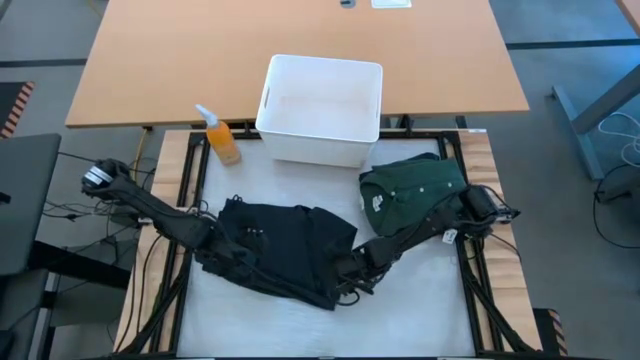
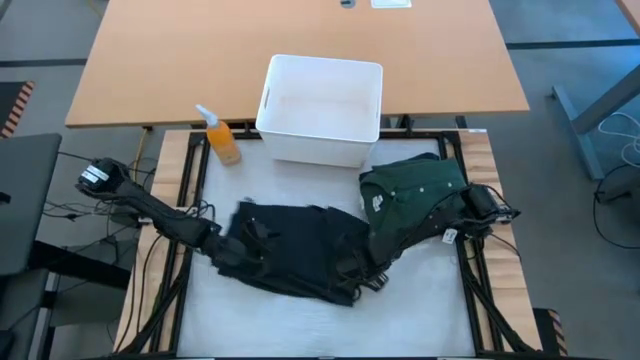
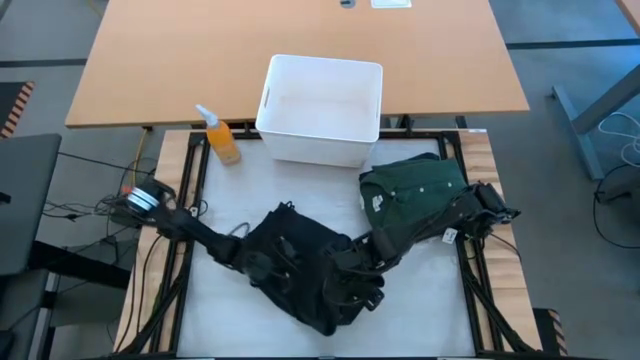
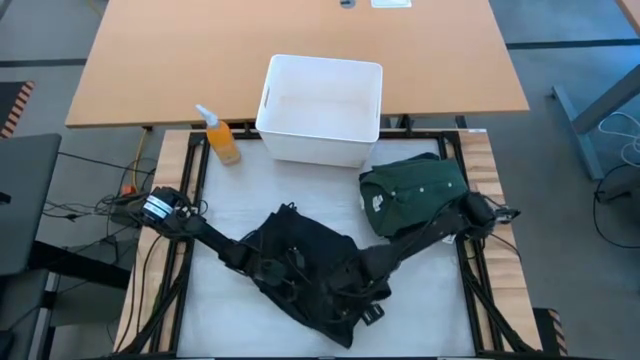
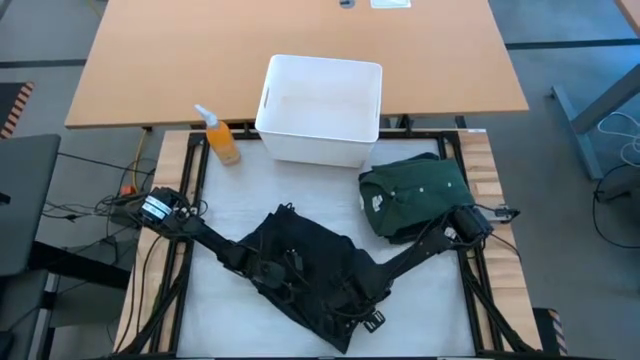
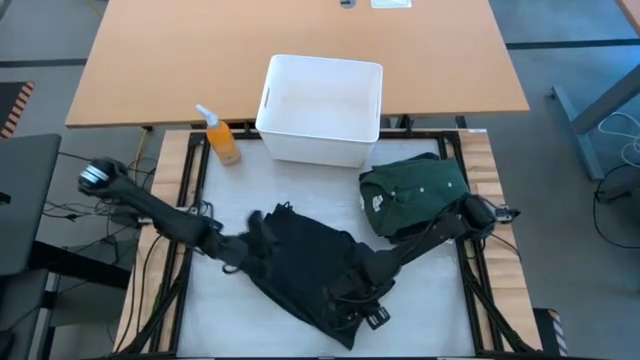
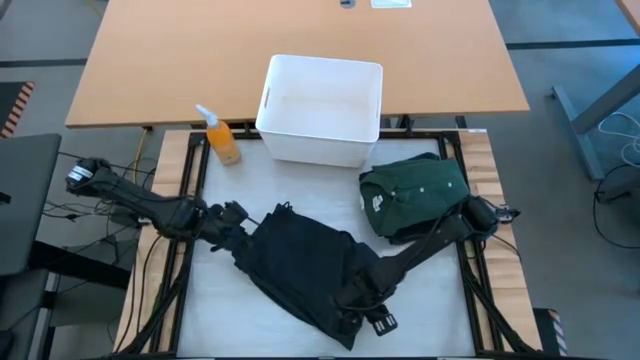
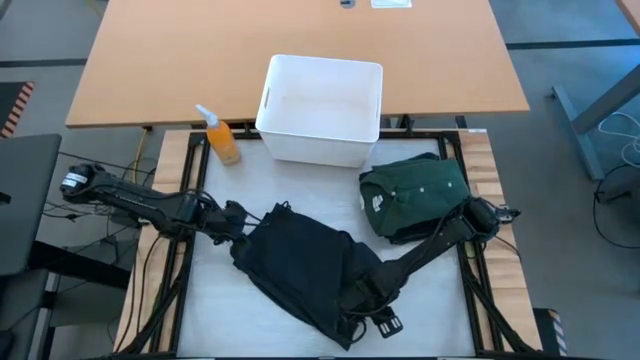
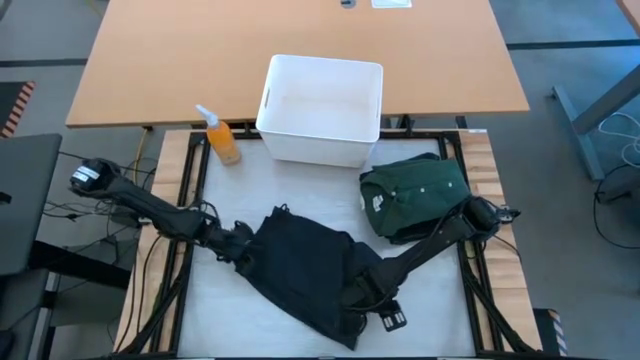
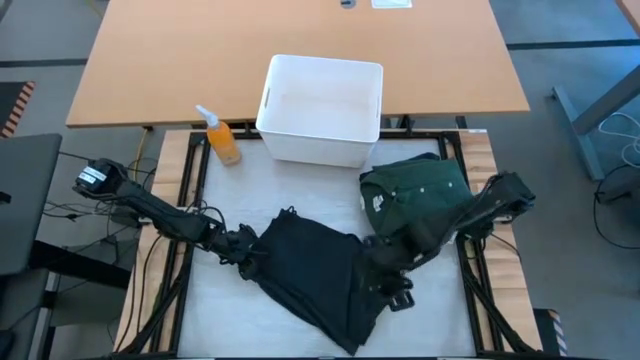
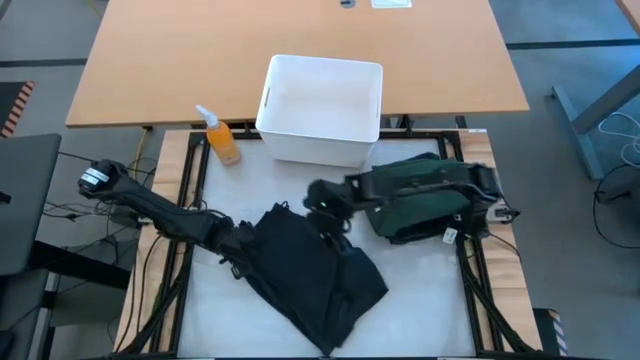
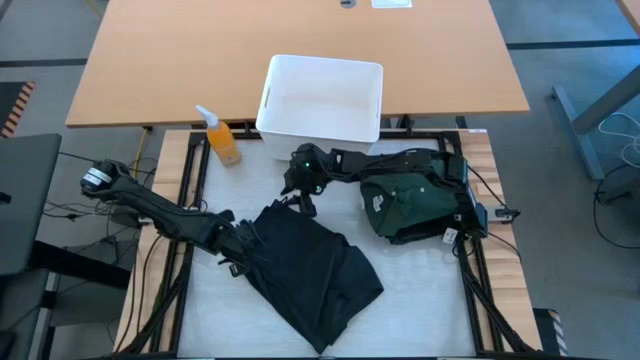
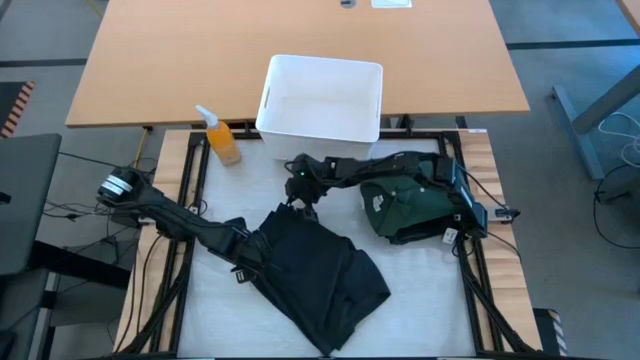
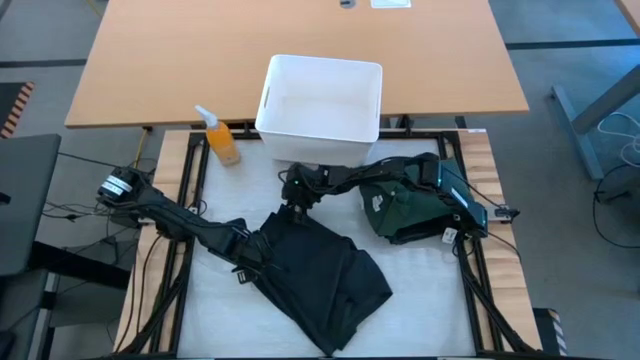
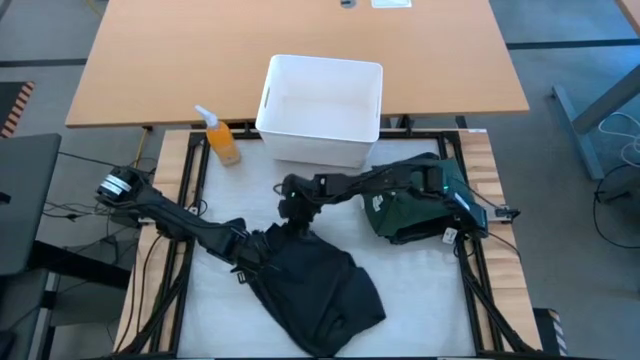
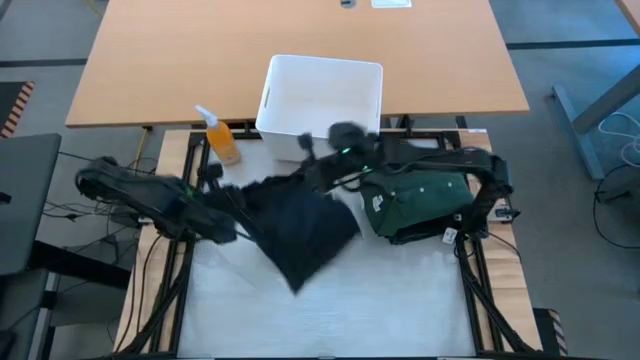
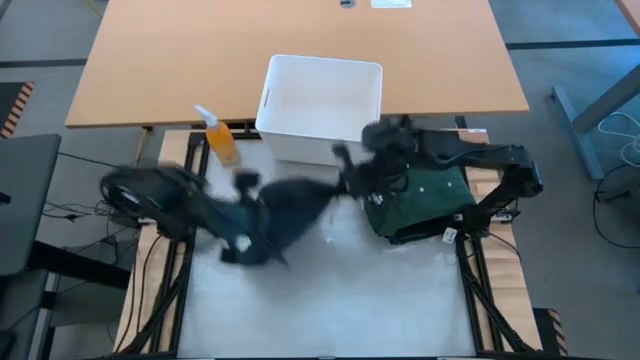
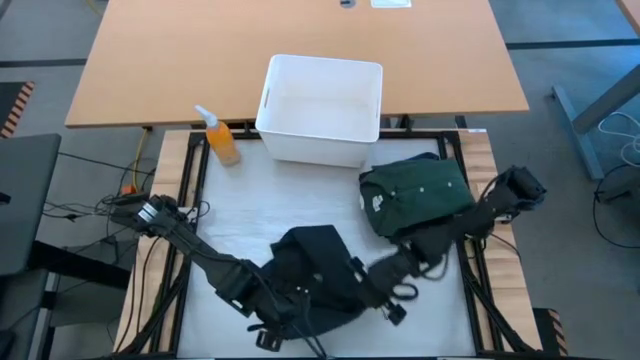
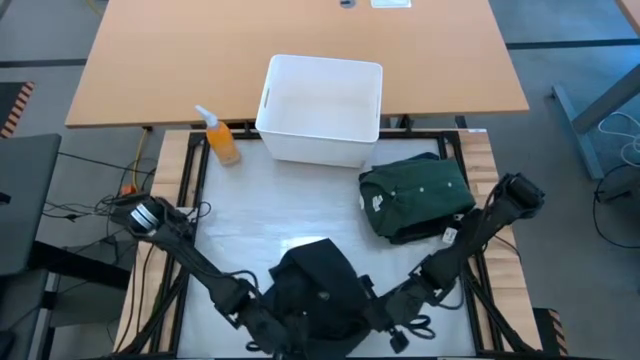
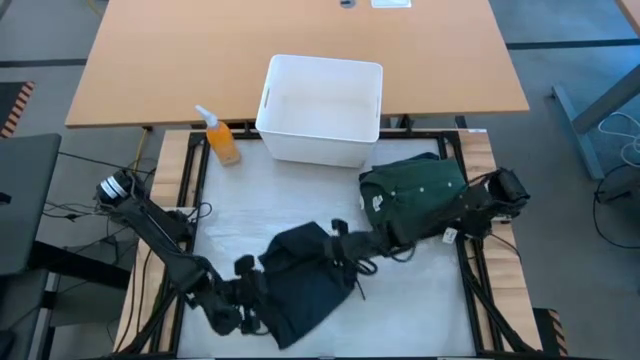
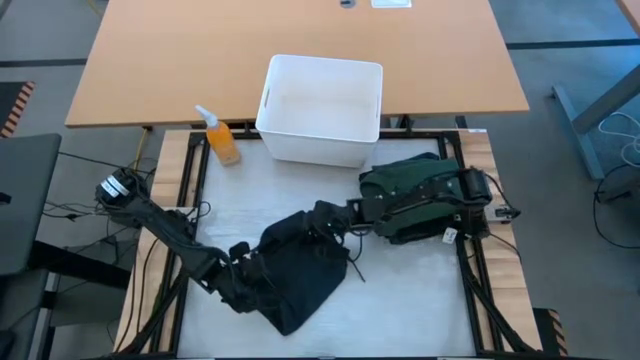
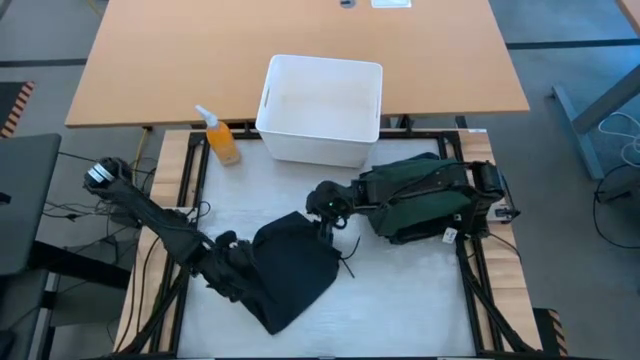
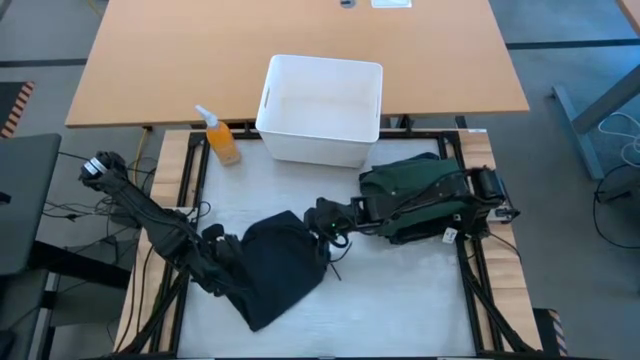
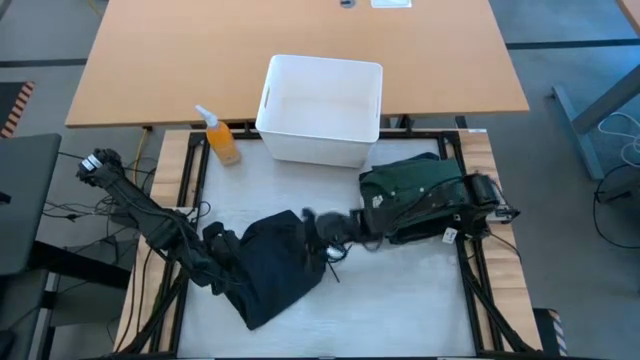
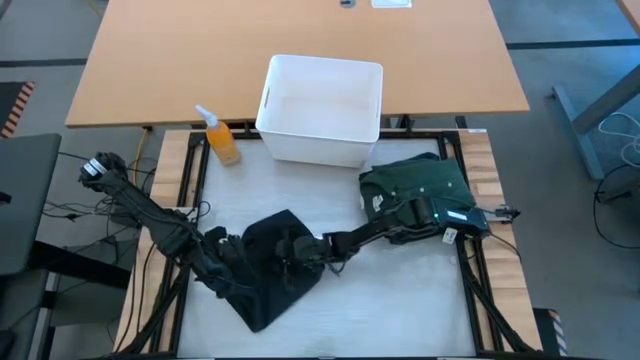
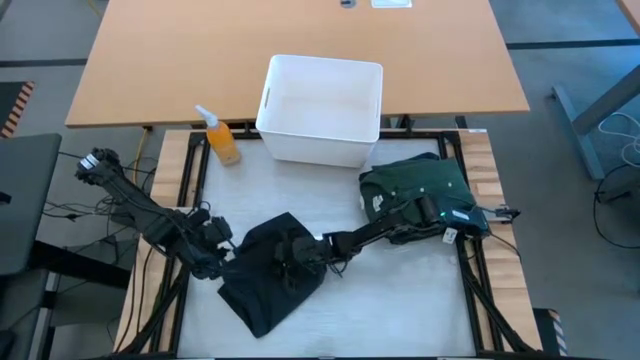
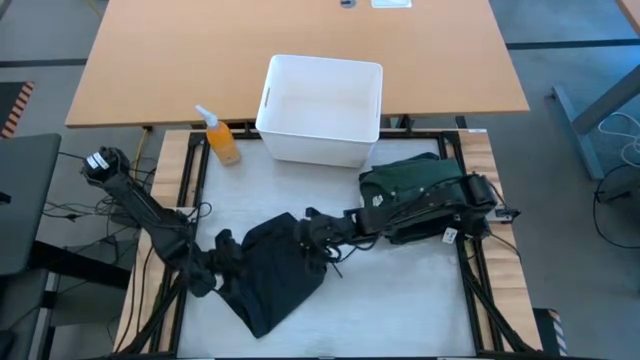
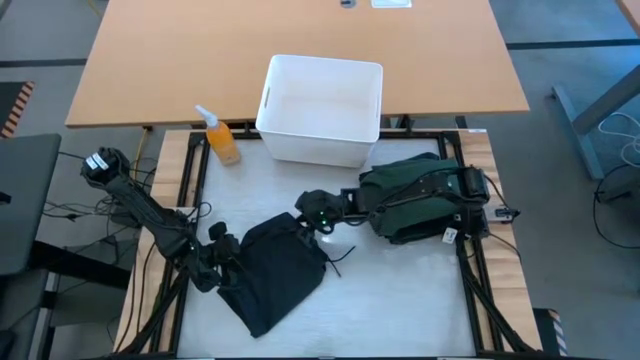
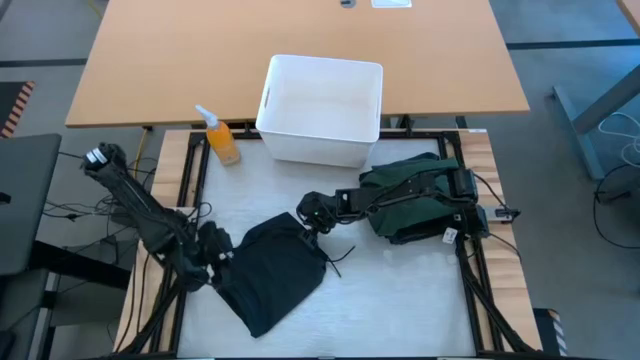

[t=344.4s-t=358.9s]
Task: Fold laundry
Fold the black shorts

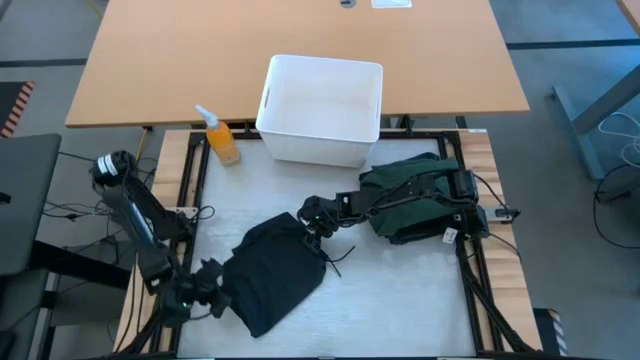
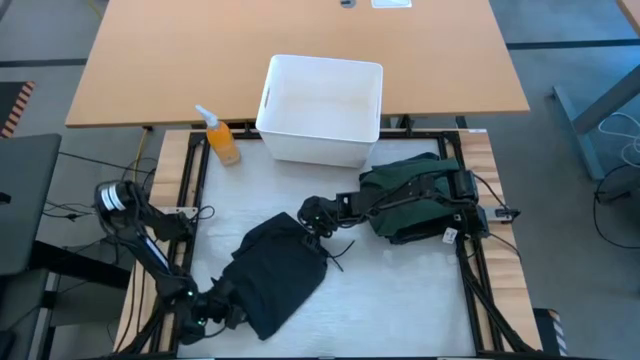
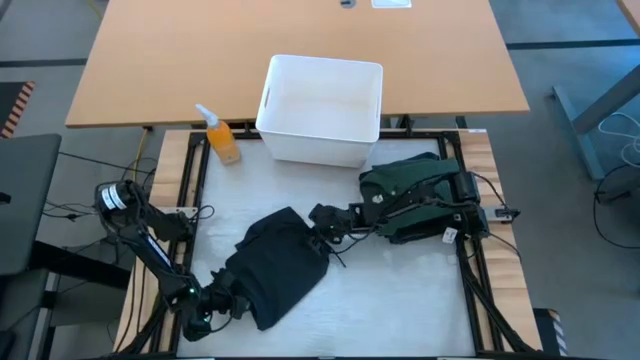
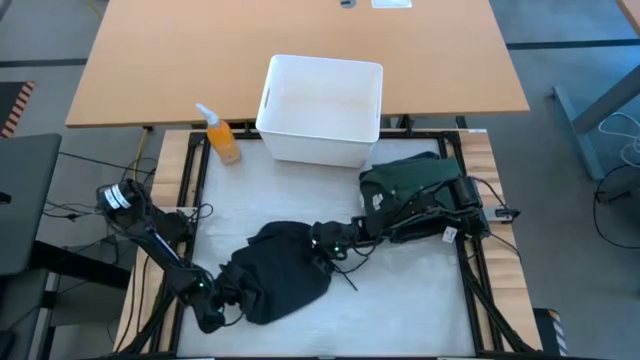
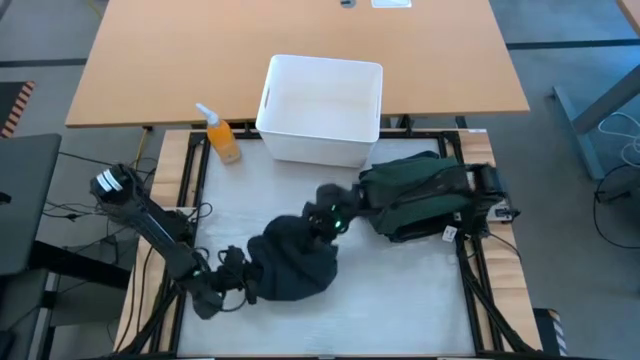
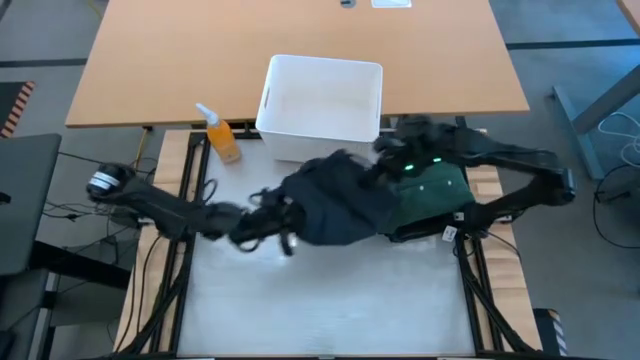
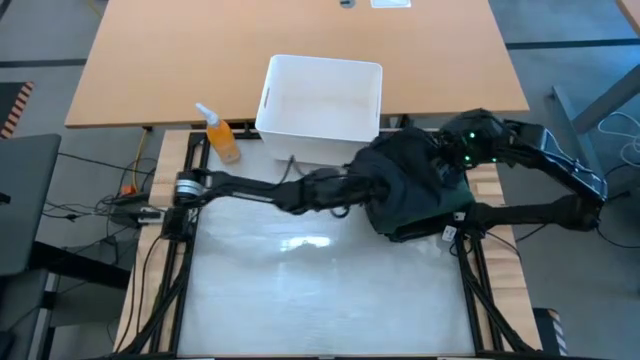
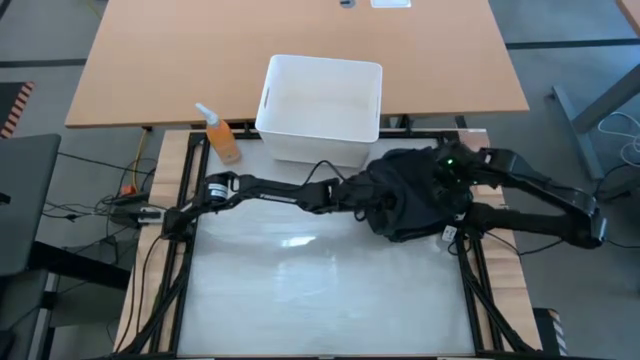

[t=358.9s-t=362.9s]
Stack the black shorts on the green polo shirt
